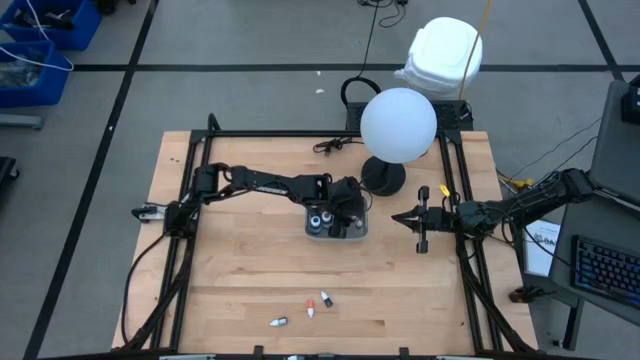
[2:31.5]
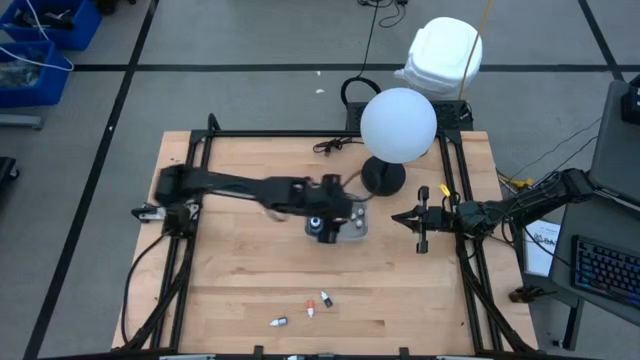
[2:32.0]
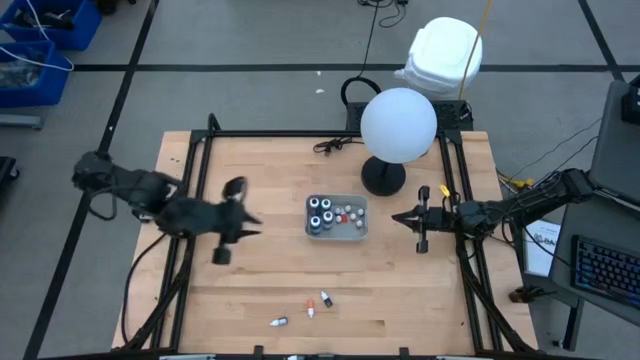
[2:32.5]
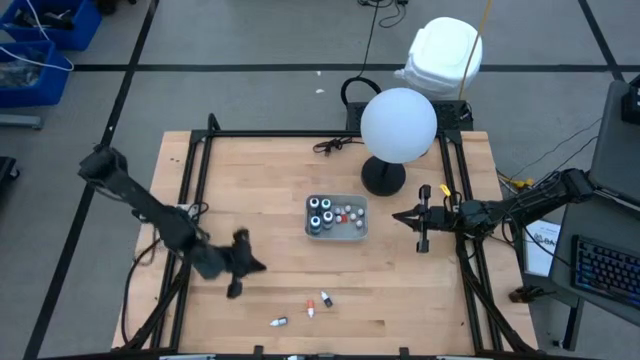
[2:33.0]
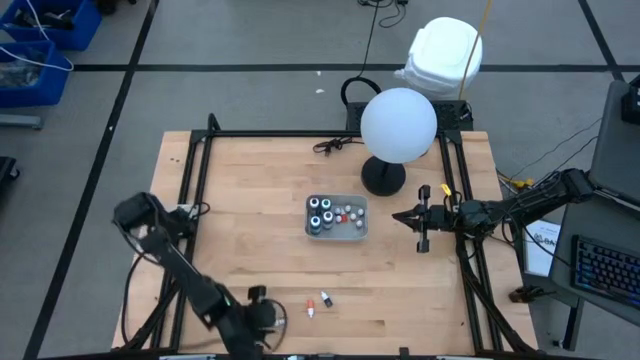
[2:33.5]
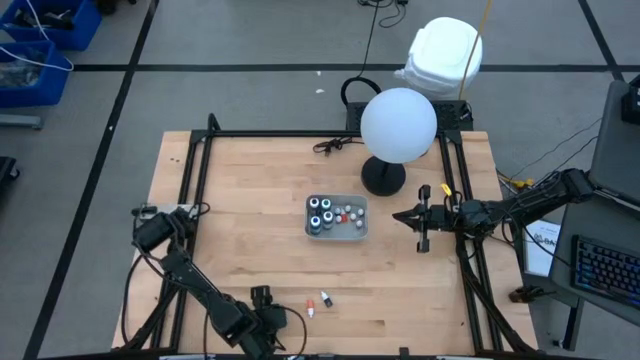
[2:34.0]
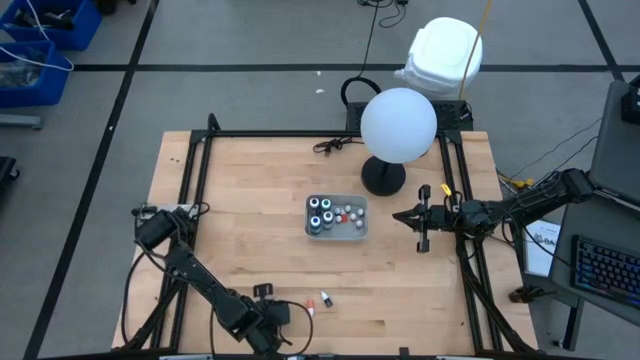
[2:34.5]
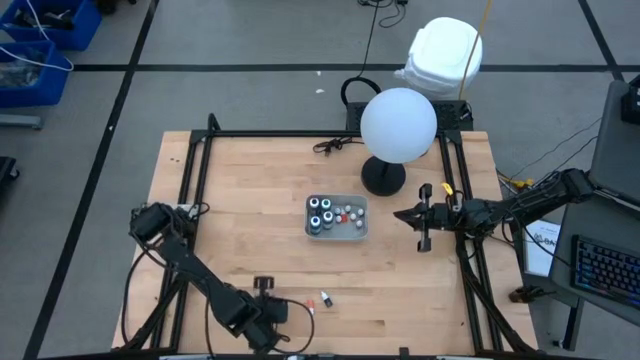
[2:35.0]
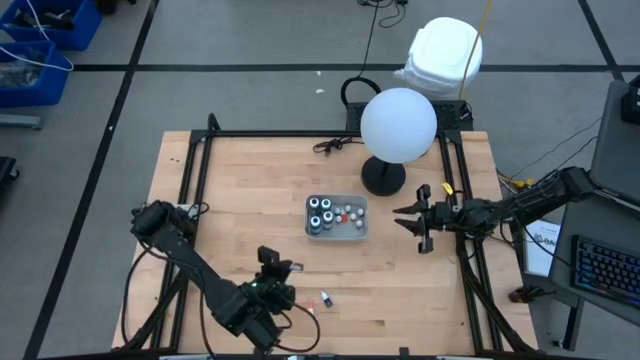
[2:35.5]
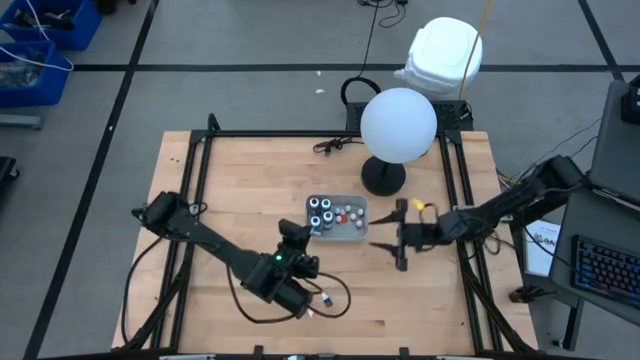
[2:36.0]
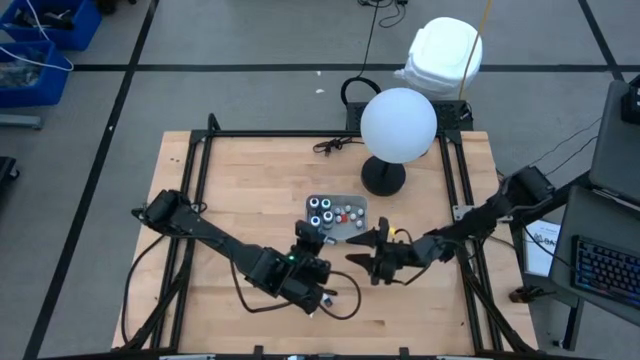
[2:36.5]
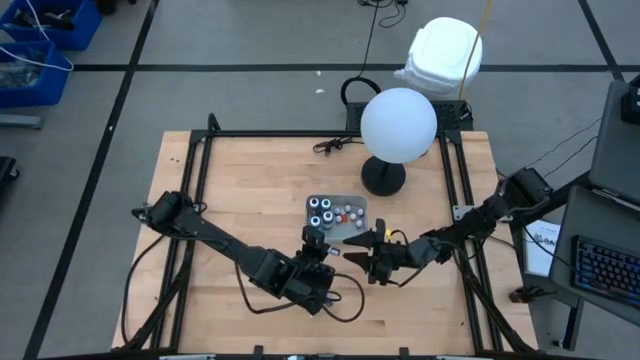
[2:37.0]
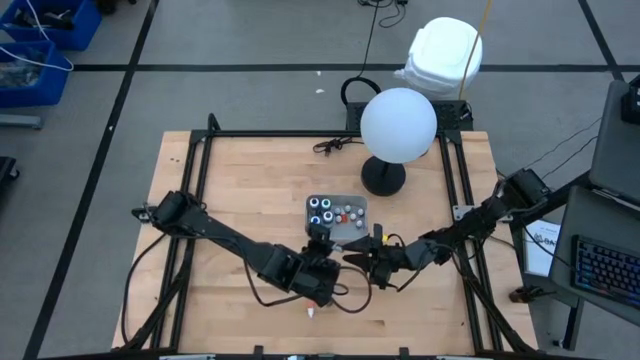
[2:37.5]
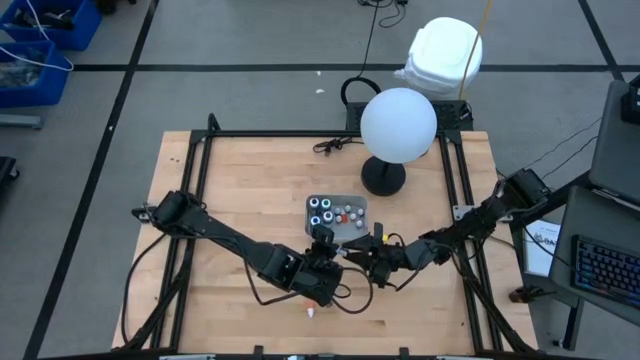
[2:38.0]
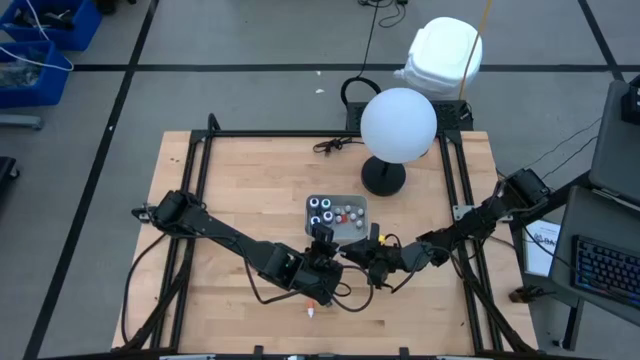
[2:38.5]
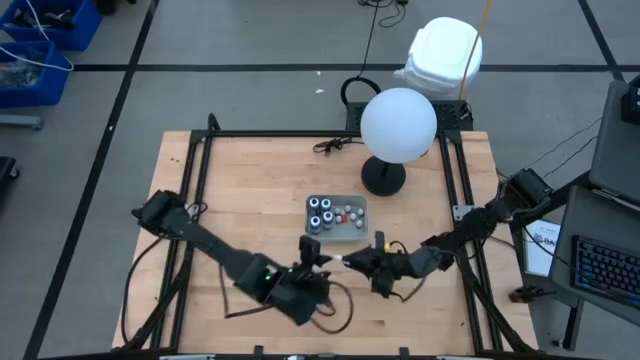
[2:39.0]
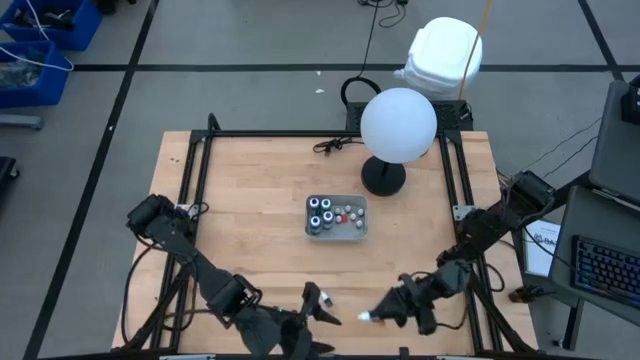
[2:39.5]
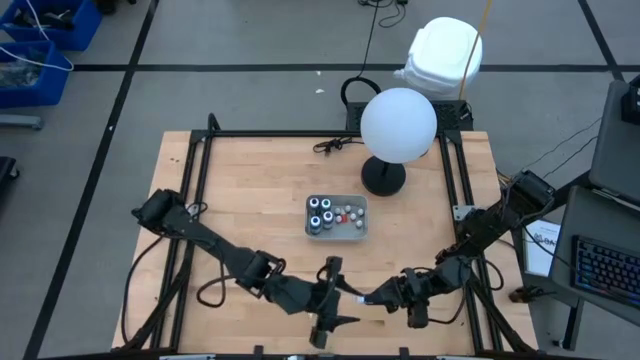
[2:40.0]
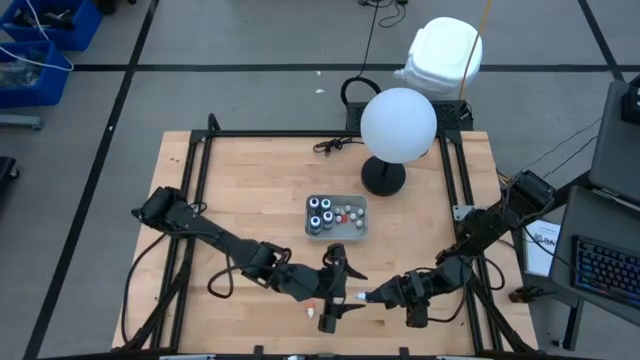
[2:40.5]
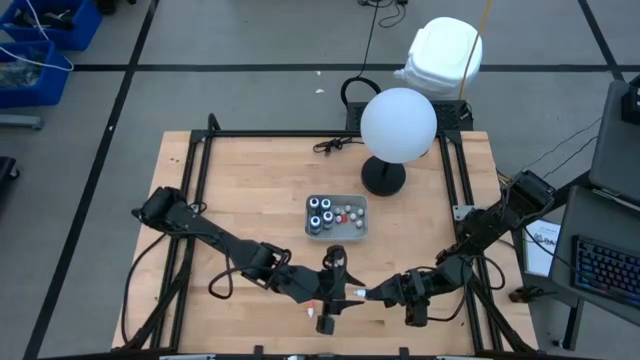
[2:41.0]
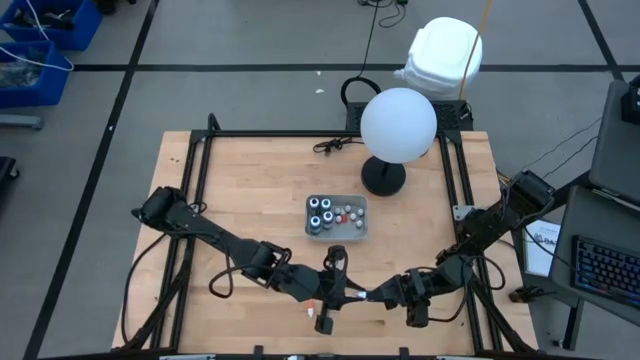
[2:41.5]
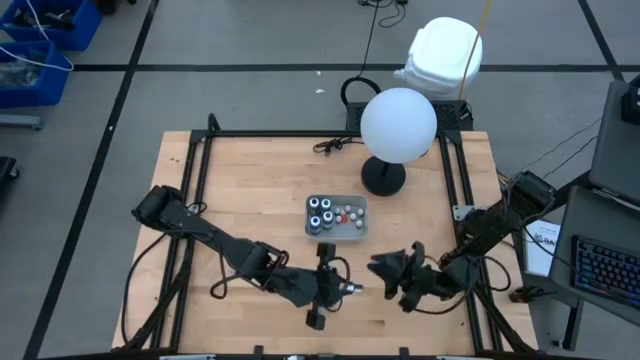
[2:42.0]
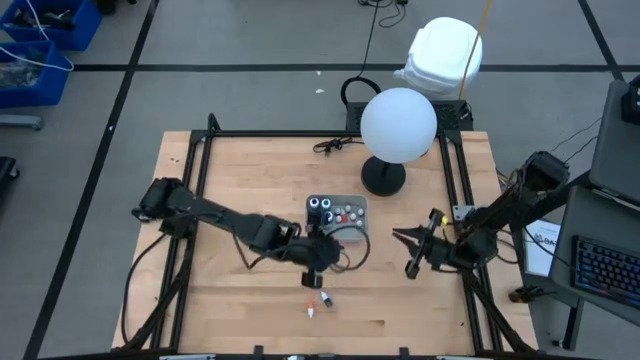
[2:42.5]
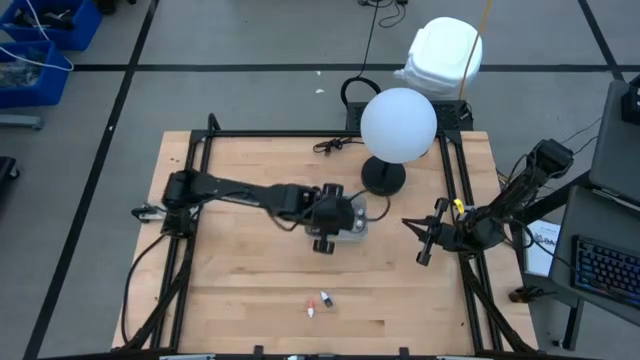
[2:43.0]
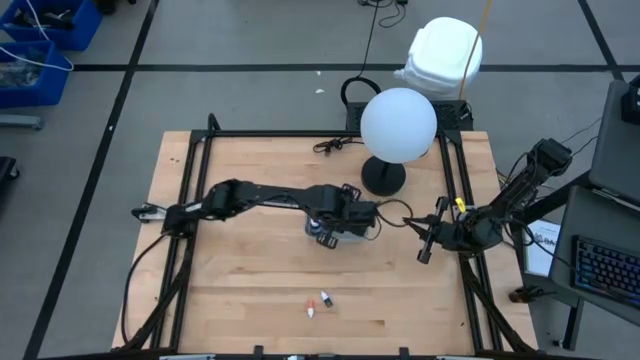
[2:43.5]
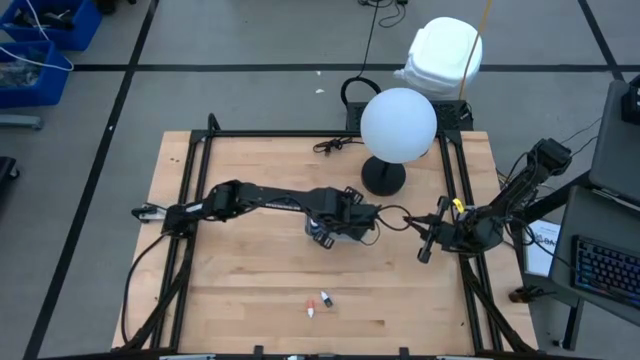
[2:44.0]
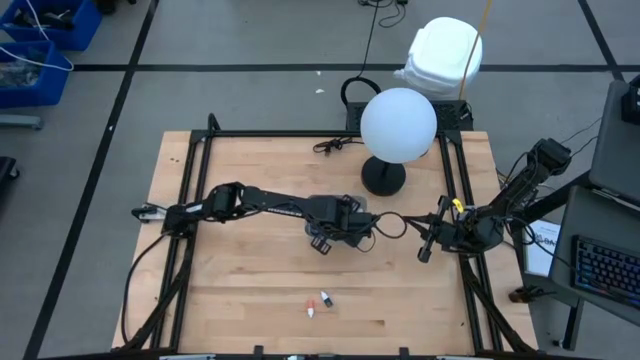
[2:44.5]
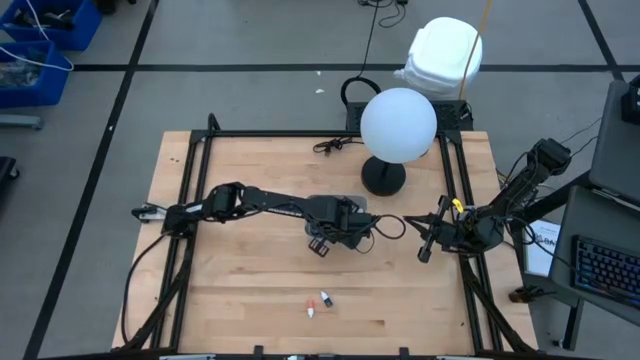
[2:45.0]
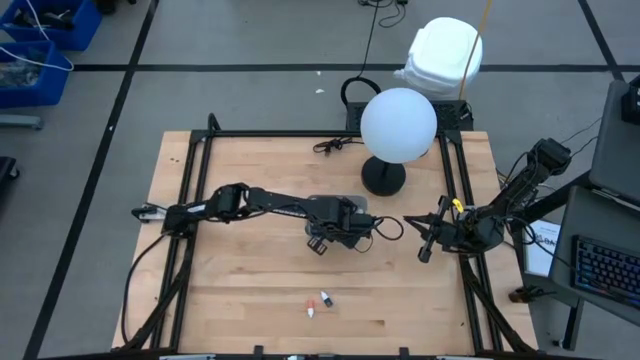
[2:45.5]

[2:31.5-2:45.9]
Task: Pick & Place food coloring
Put the left small purple food coloring bottle into the gray bin

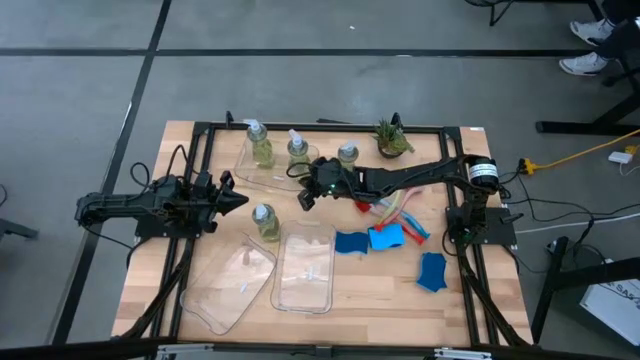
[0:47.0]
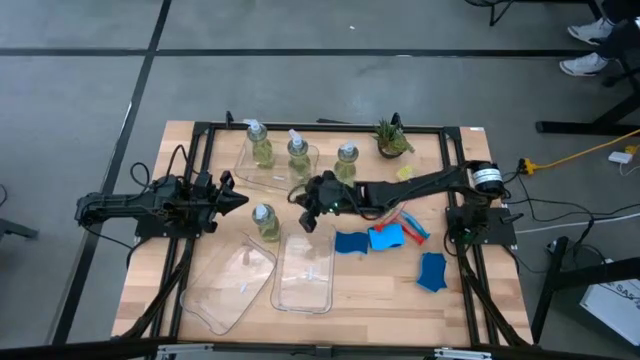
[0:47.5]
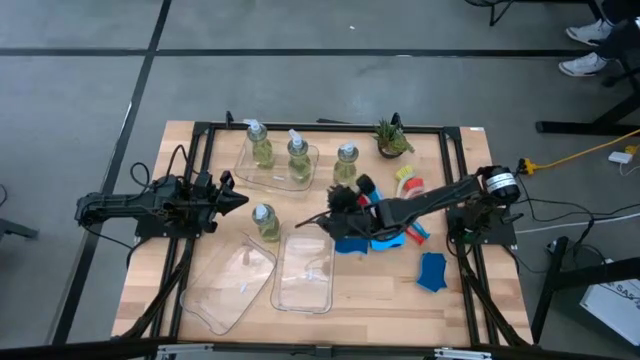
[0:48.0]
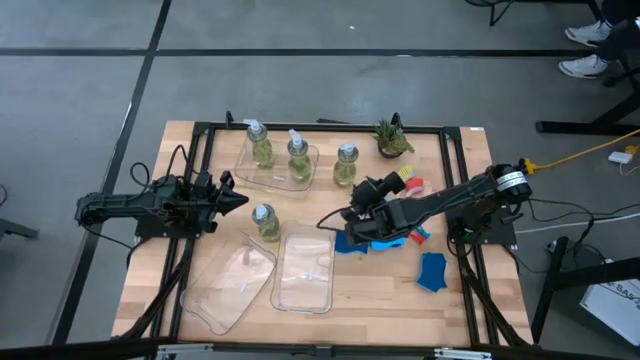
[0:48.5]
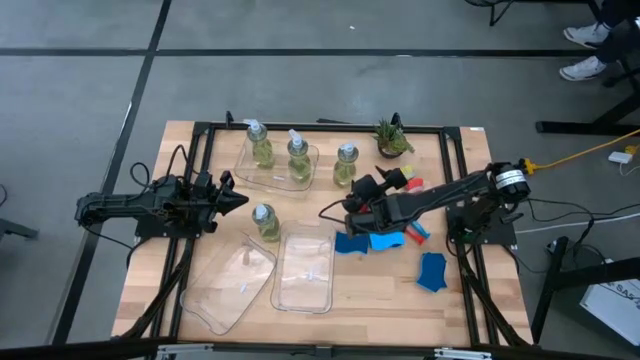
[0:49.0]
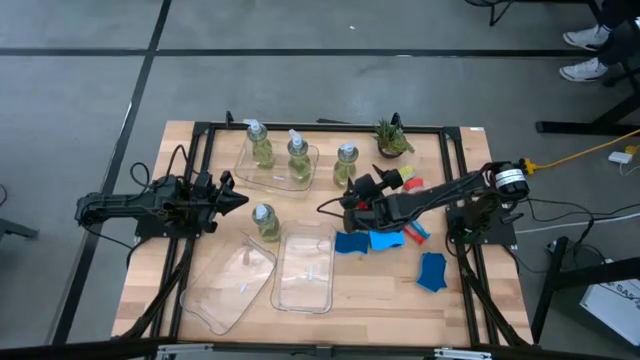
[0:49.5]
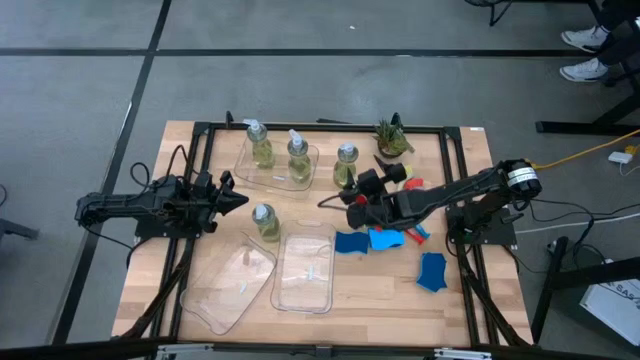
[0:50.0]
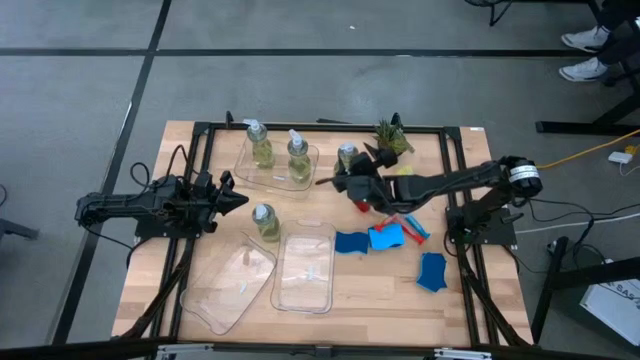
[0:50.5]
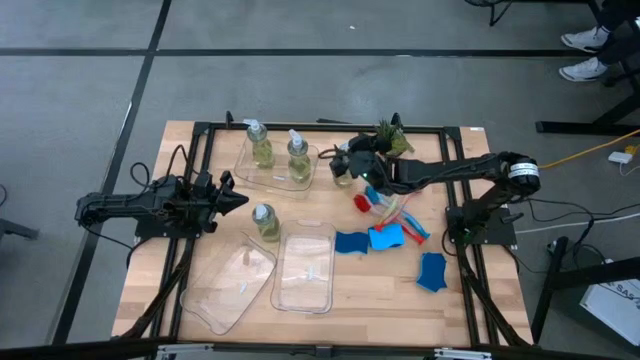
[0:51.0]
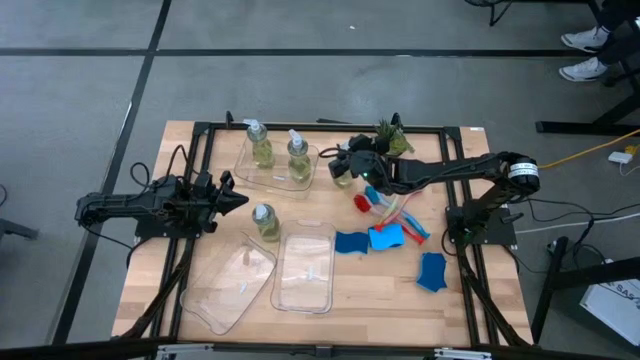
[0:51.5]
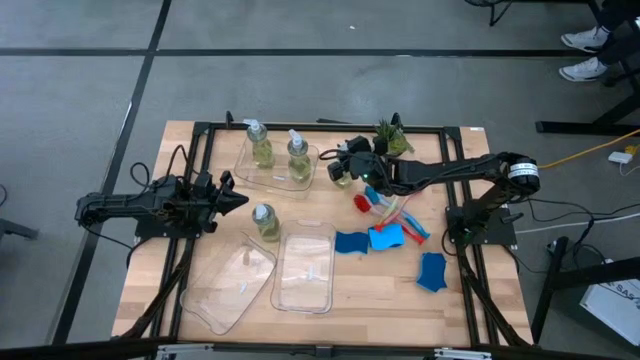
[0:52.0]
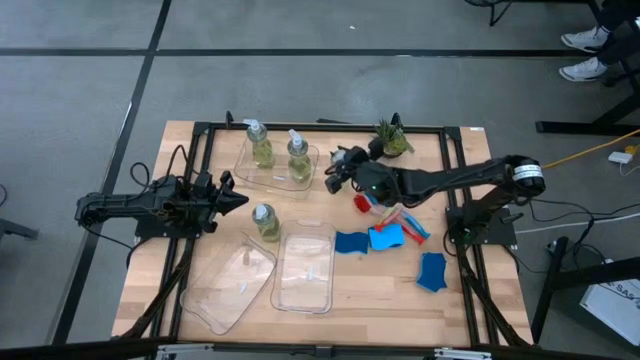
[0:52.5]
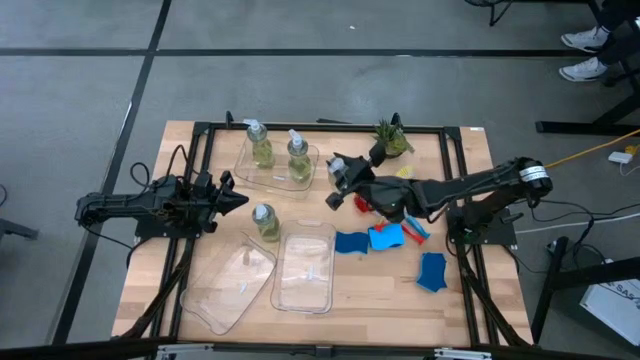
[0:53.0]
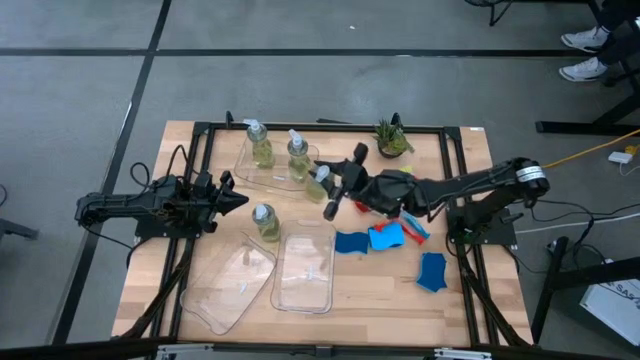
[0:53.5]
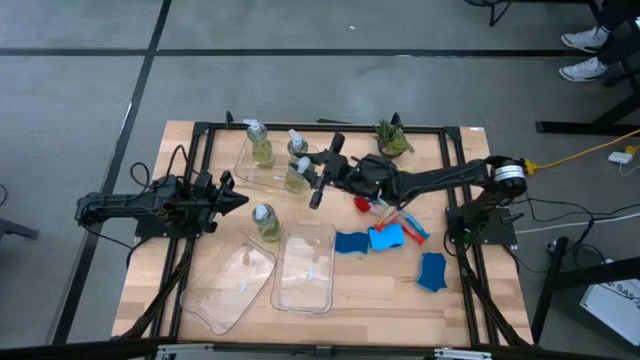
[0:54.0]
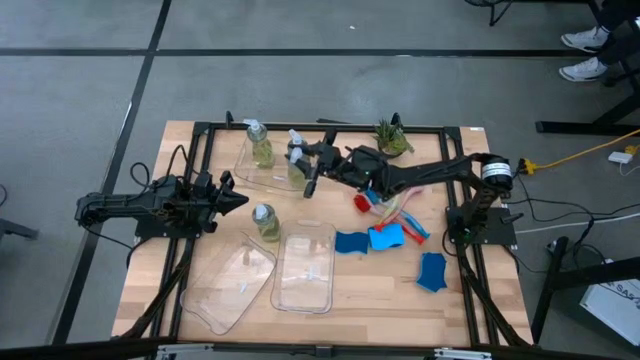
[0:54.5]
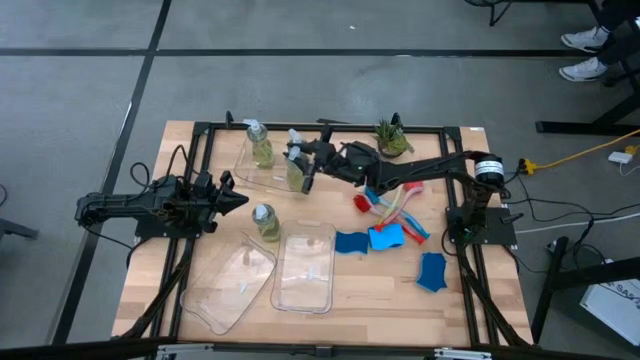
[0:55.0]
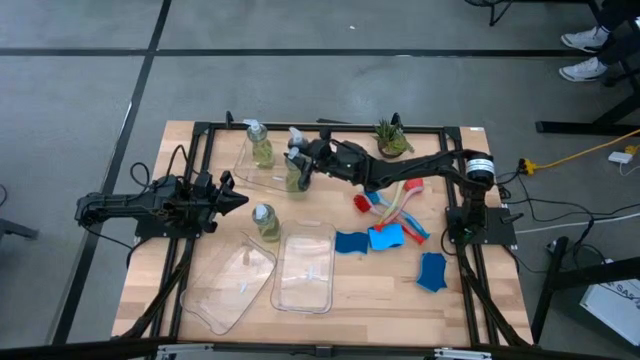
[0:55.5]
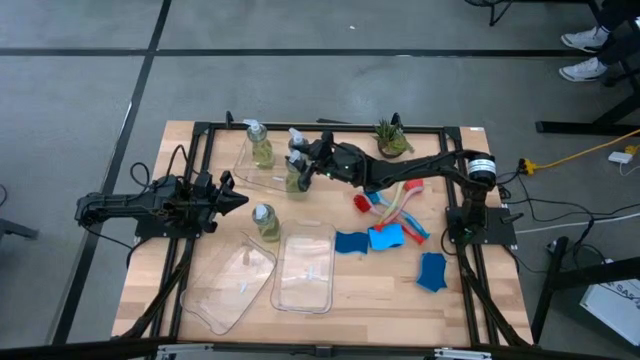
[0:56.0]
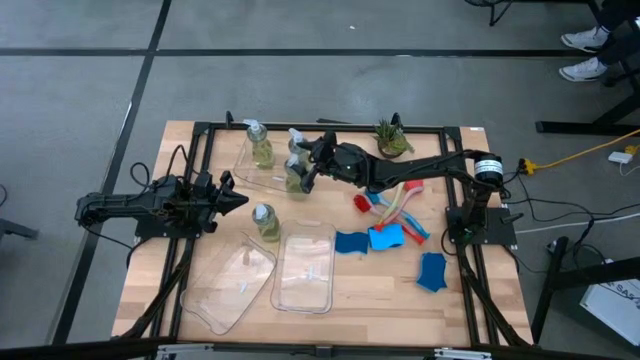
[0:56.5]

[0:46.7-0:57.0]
Task: Pick & Place Kitchen Sink Supplies
Put the green soap dispenser into the top transparent bin
